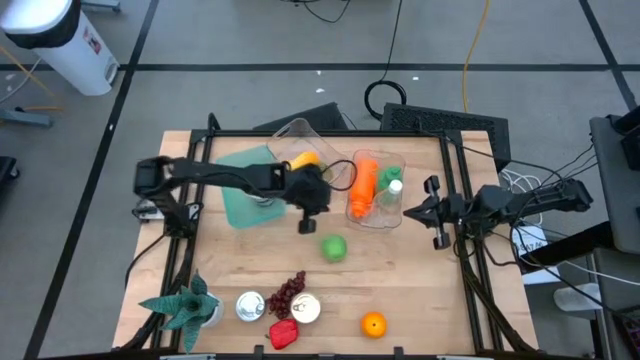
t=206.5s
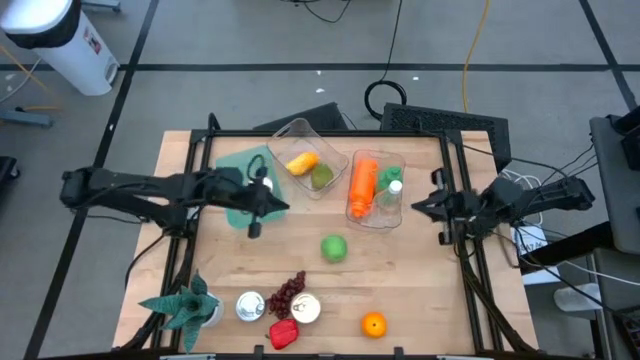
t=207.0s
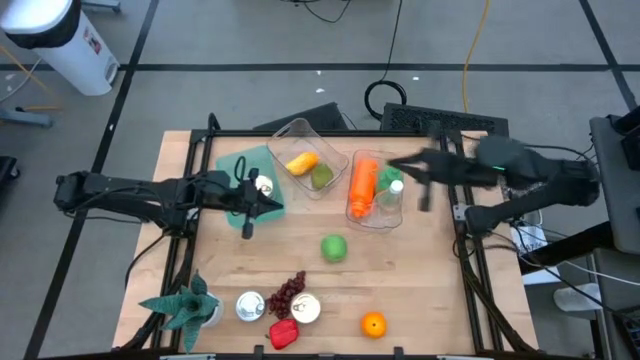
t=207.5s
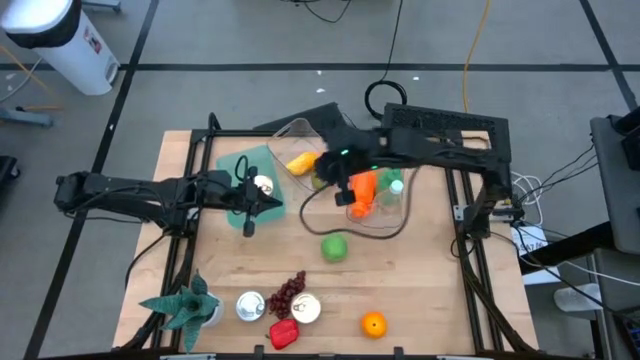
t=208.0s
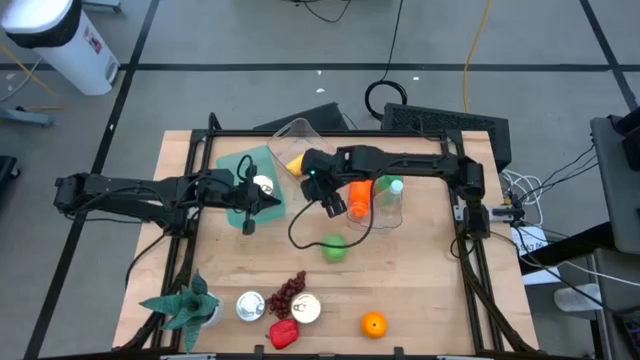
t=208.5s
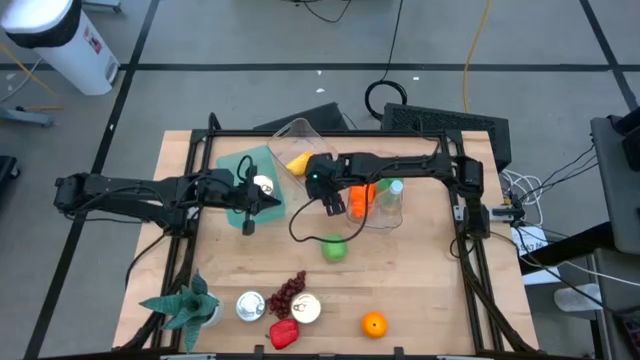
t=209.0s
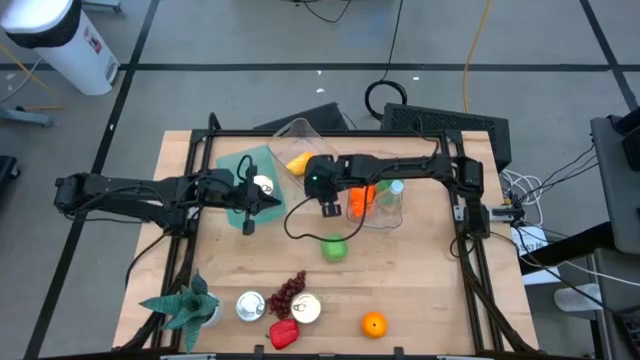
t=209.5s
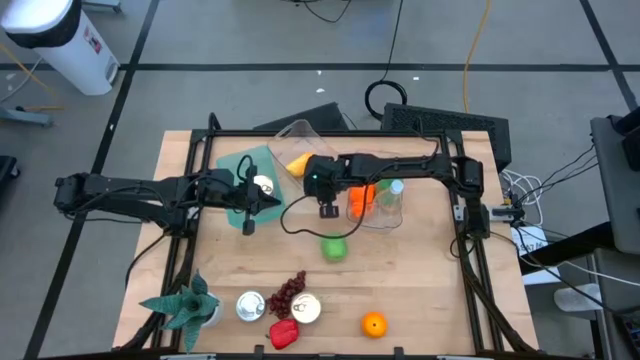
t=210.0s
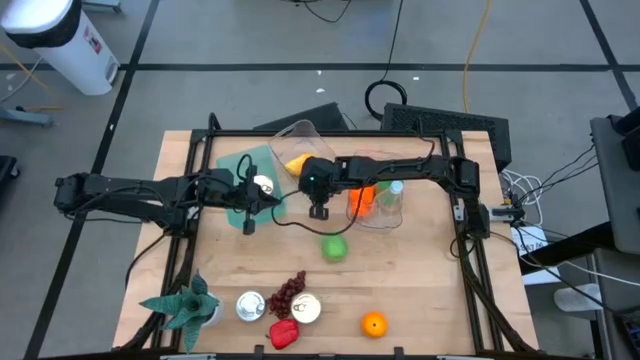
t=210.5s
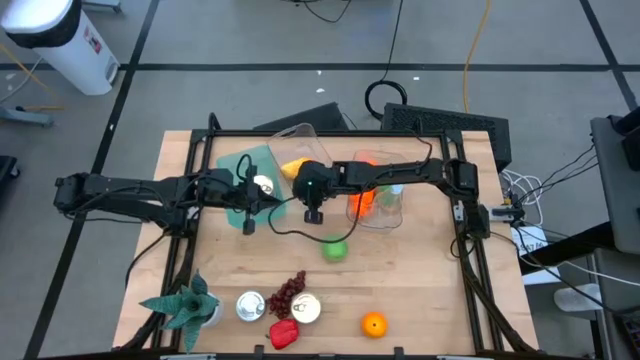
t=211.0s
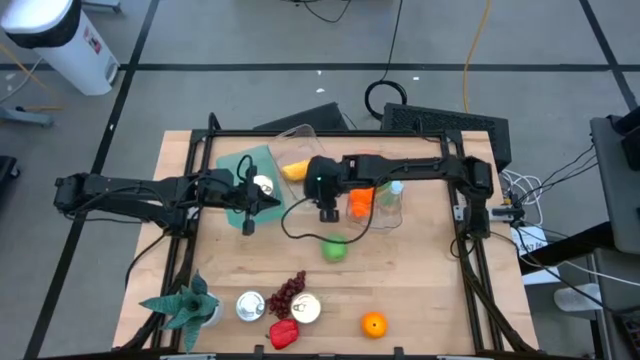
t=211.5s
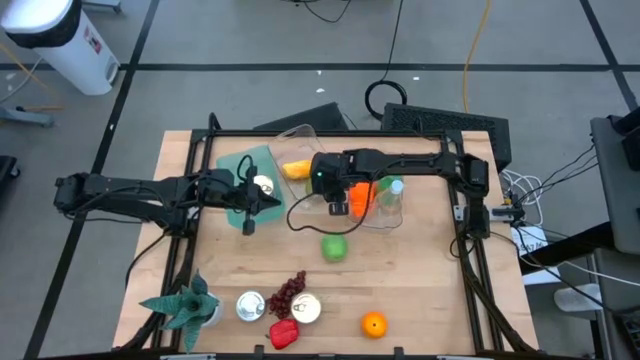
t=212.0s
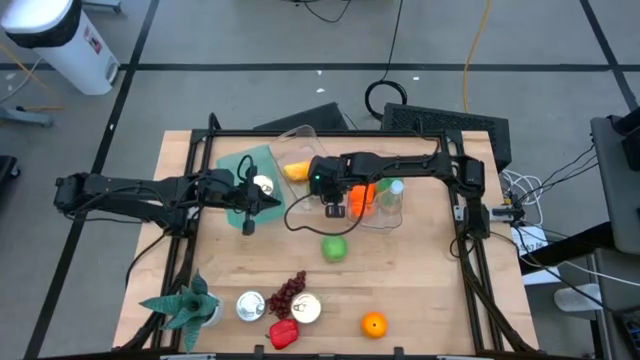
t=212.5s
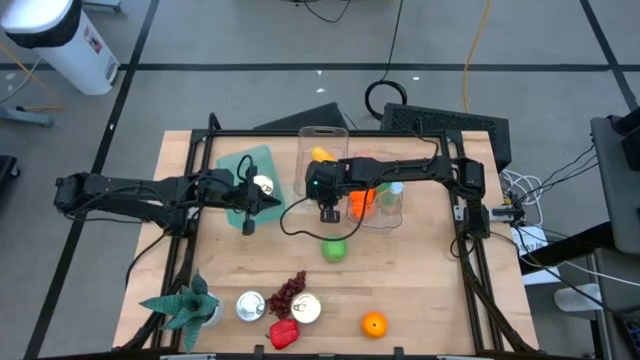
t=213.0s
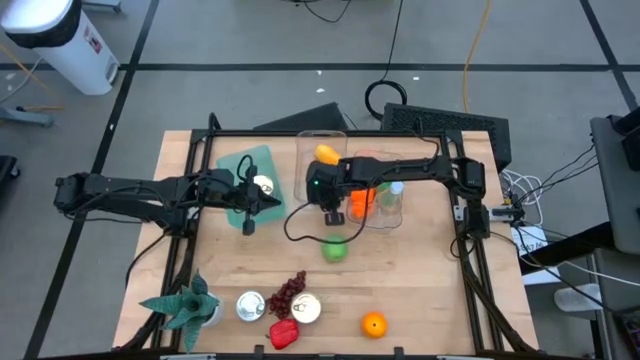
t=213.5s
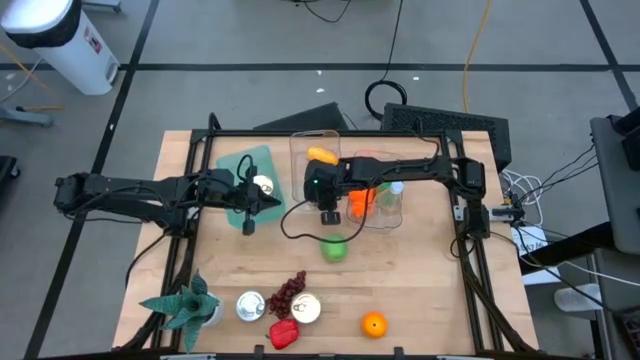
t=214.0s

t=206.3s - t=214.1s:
Task: Pick & Place Food Item
Adjust the left transparent bin

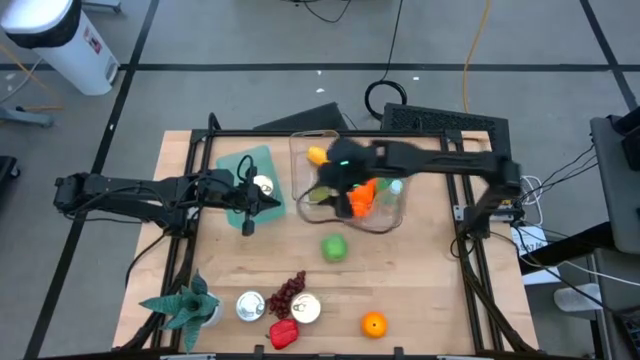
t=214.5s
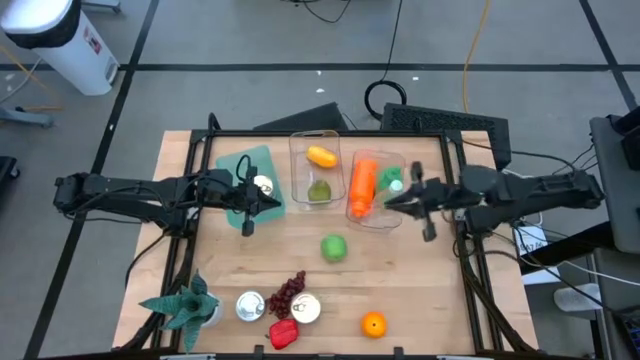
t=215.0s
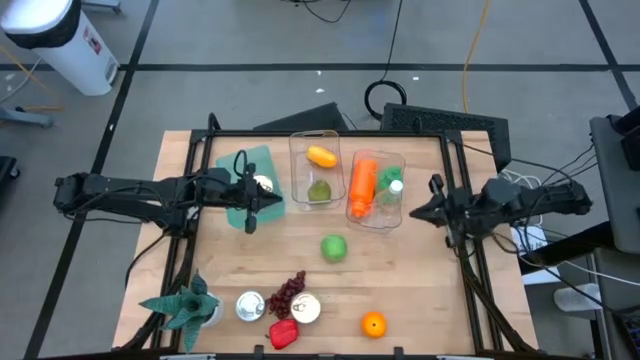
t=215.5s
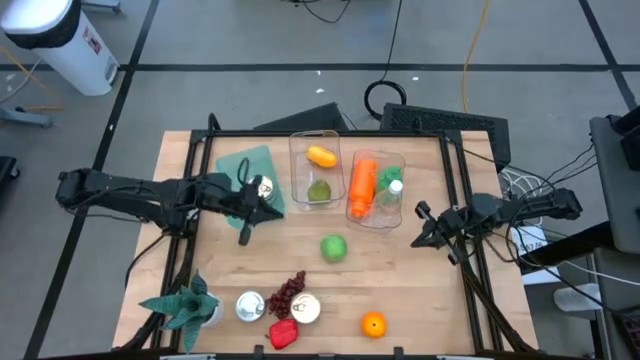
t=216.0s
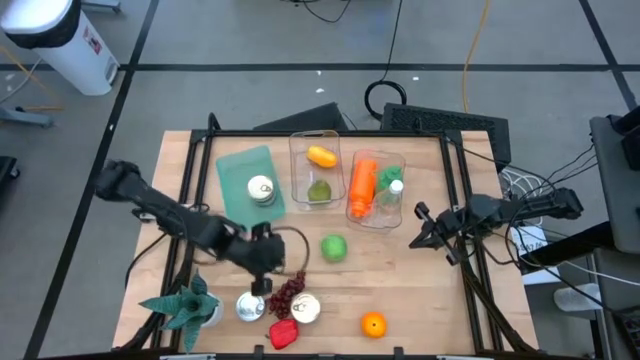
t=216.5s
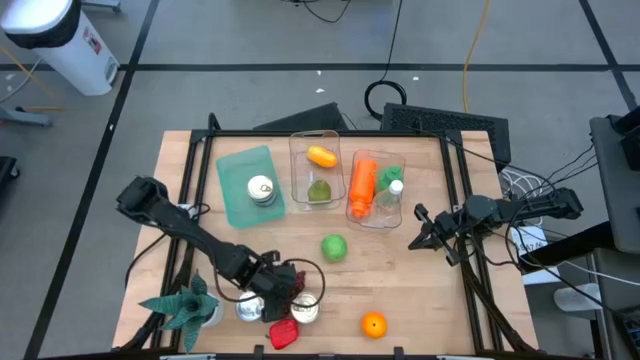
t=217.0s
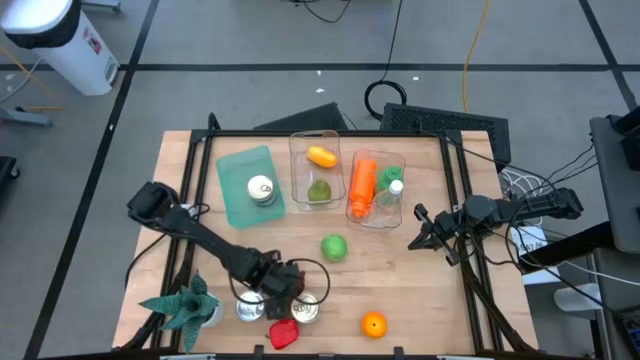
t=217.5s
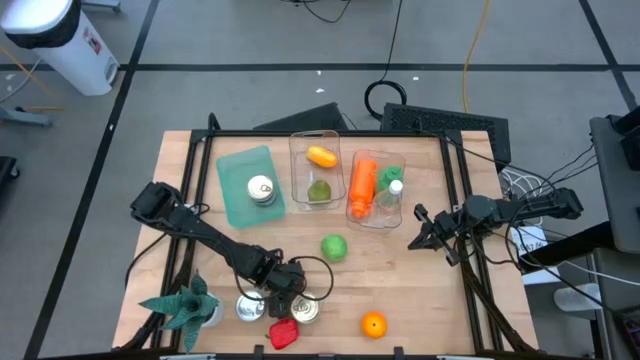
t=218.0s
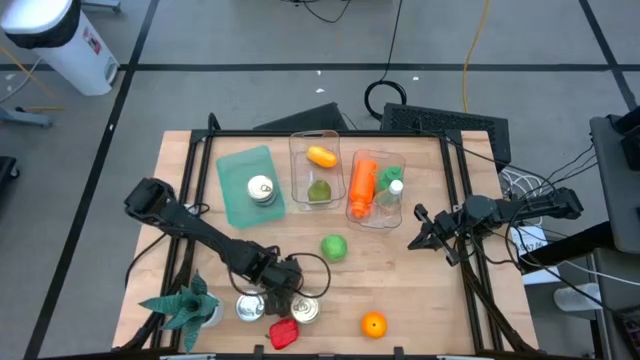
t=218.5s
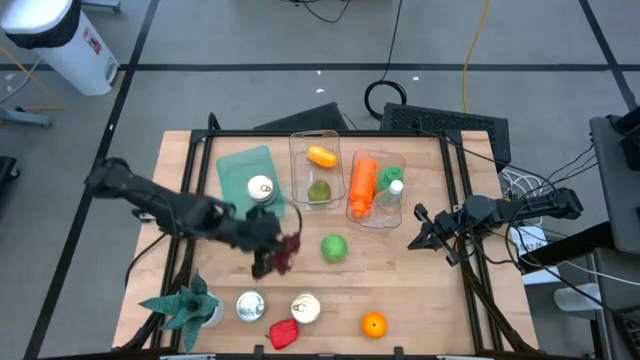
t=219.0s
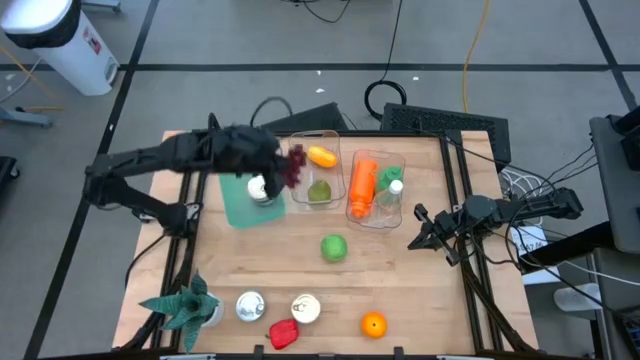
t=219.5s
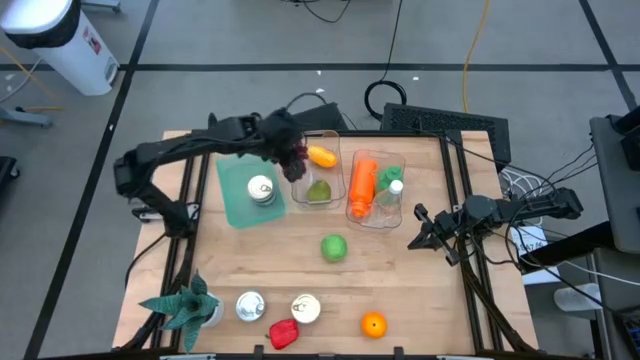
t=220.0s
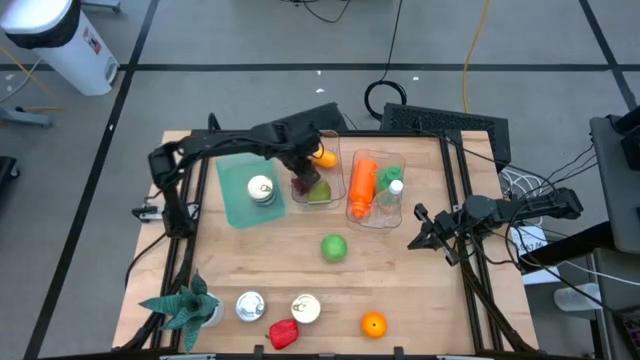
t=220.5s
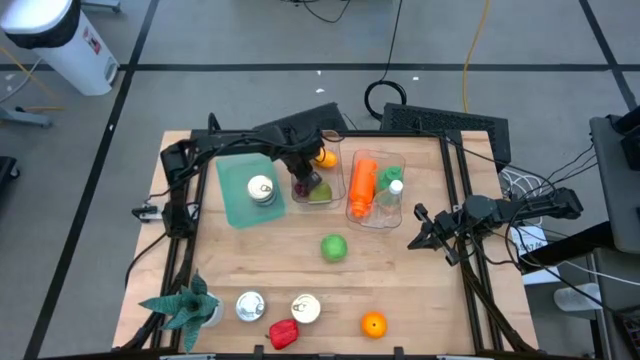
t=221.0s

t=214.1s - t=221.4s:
Put the grapes into the left transparent bin

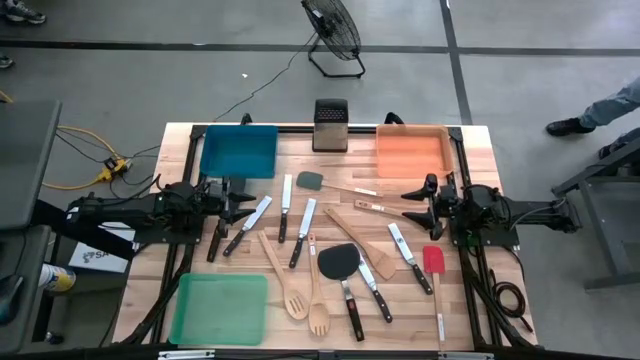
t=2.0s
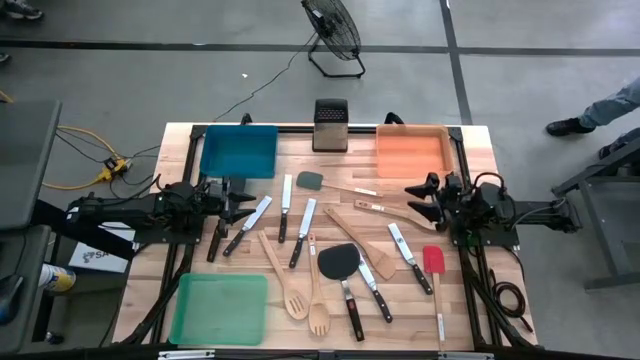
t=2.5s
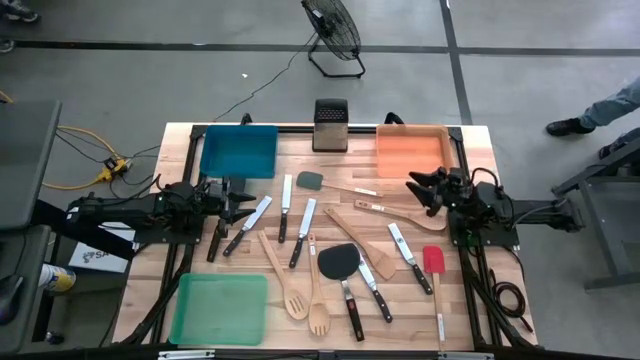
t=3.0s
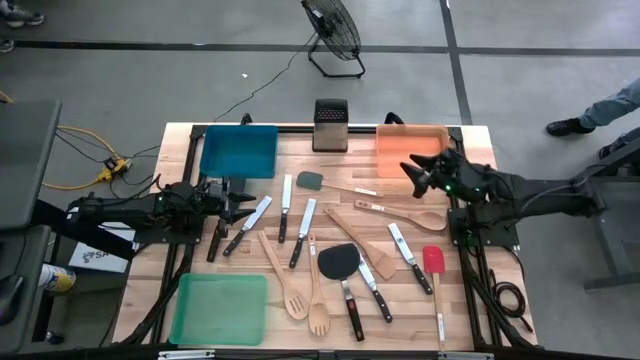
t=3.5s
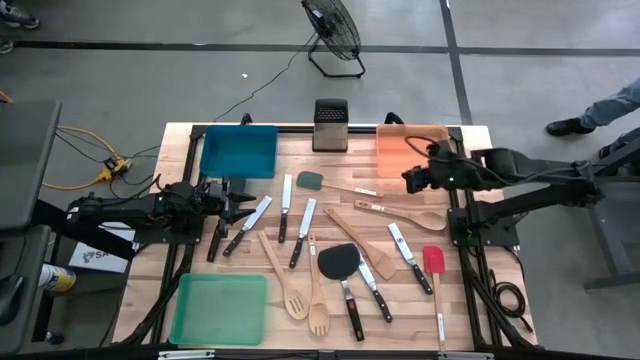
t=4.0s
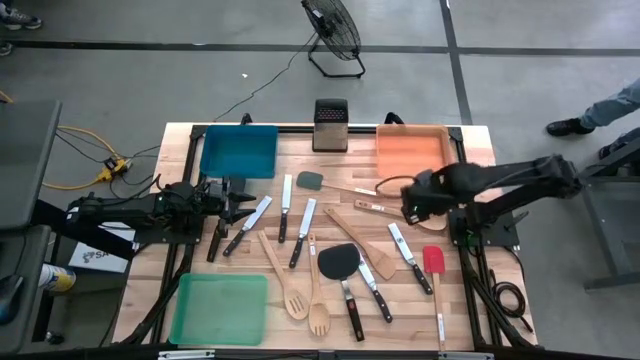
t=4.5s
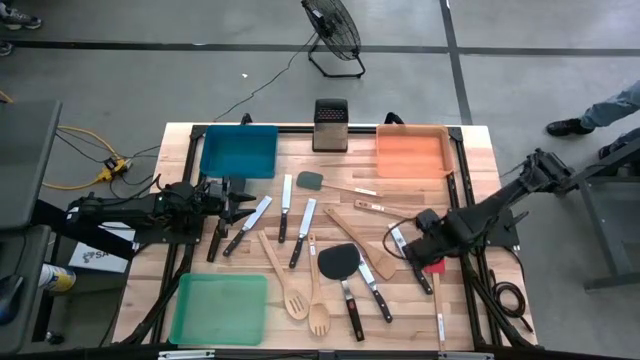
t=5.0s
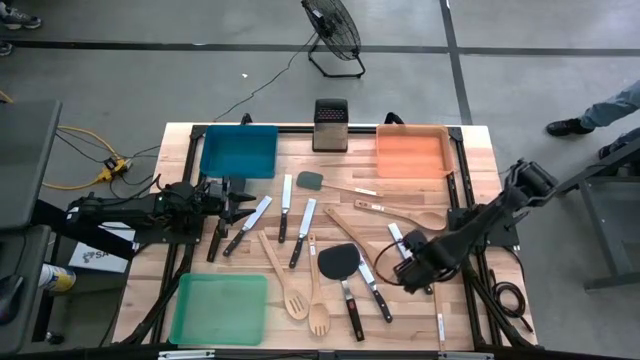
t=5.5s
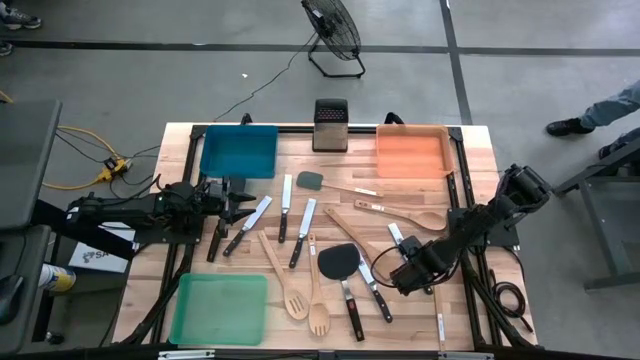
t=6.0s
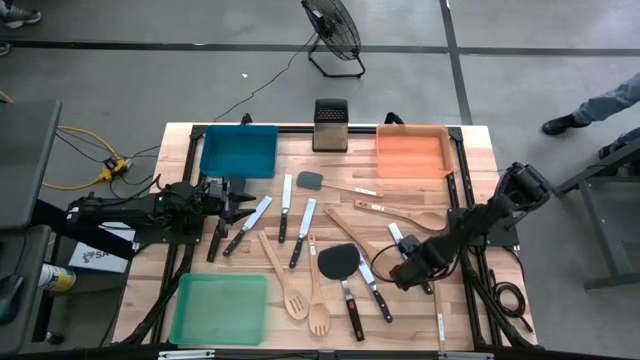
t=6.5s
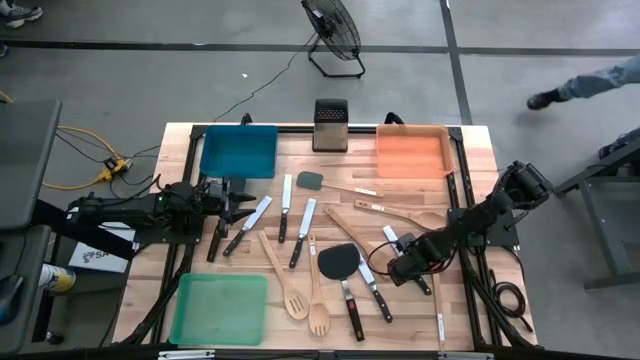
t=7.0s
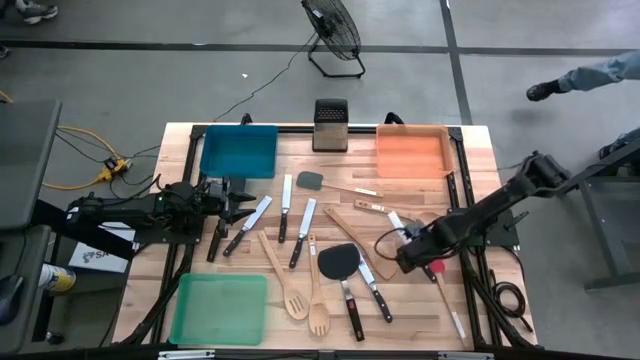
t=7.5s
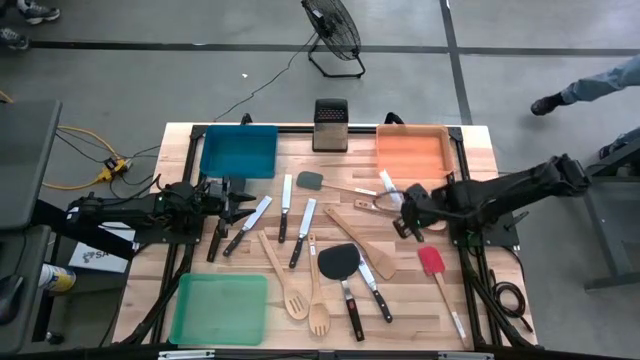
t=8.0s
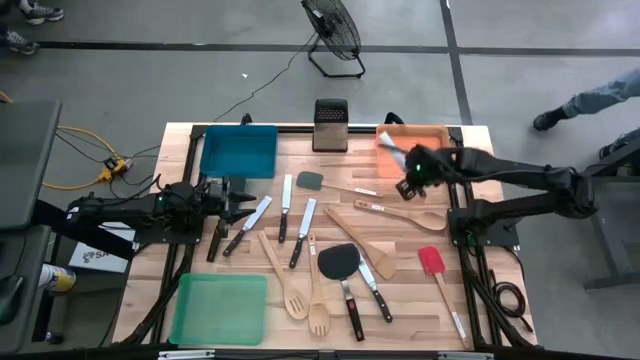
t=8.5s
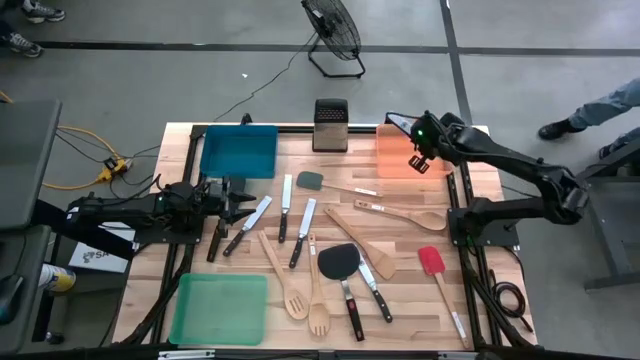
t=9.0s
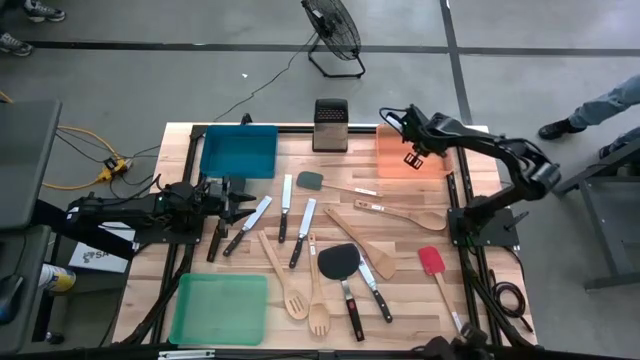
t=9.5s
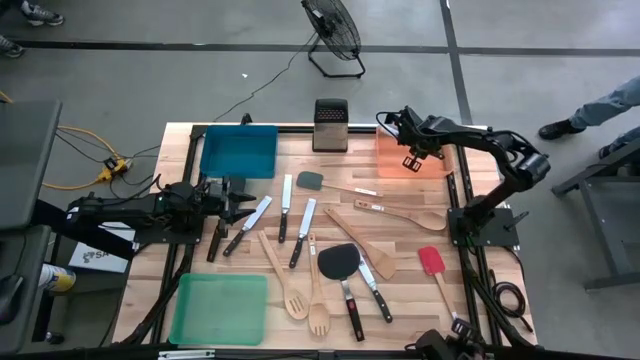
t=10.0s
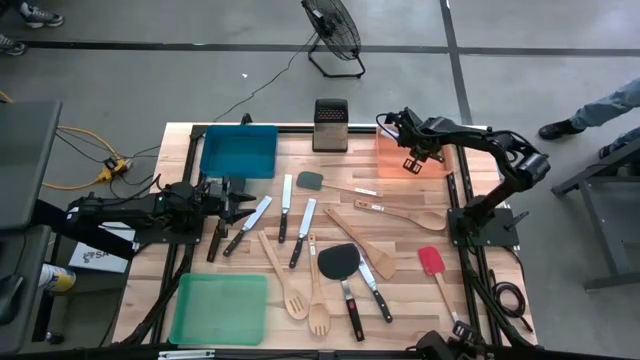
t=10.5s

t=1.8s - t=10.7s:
Task: Pick & Place Kitchen Items
Put the black spatula into the orange bin
